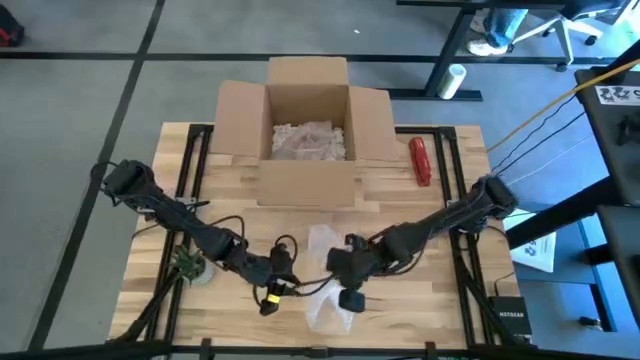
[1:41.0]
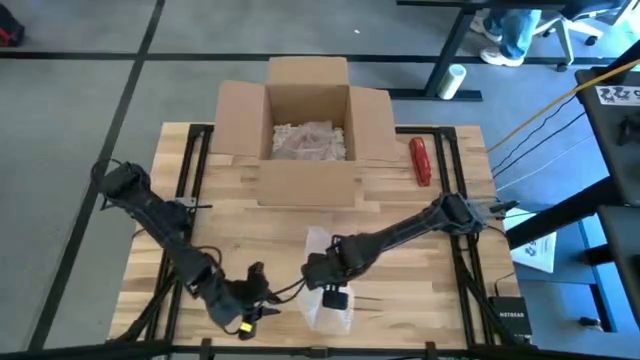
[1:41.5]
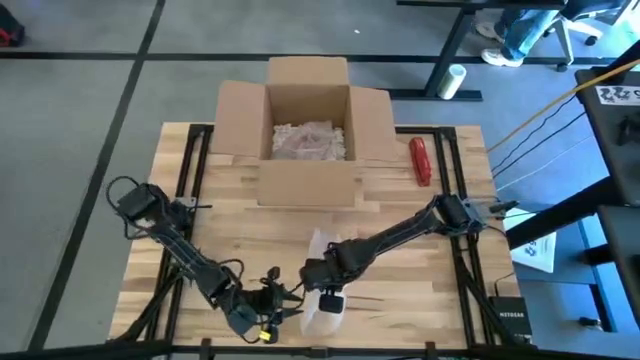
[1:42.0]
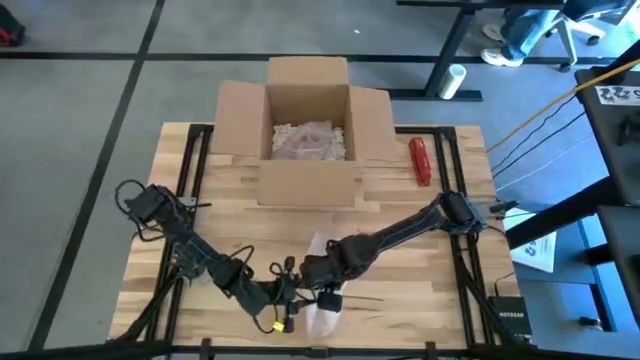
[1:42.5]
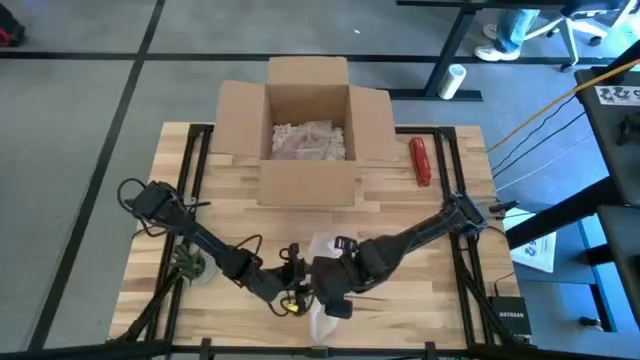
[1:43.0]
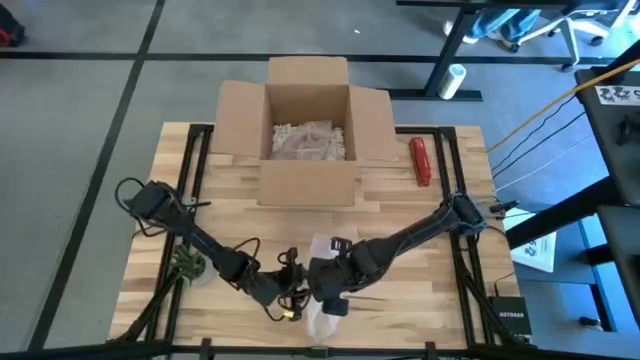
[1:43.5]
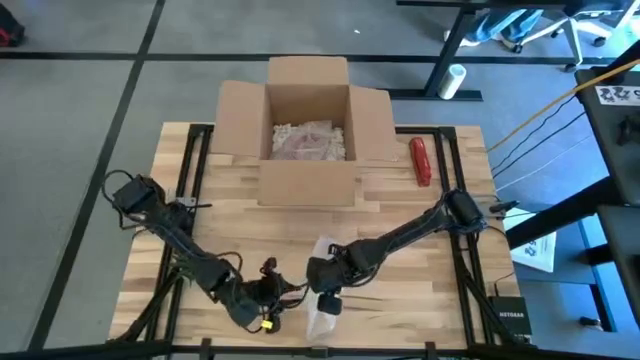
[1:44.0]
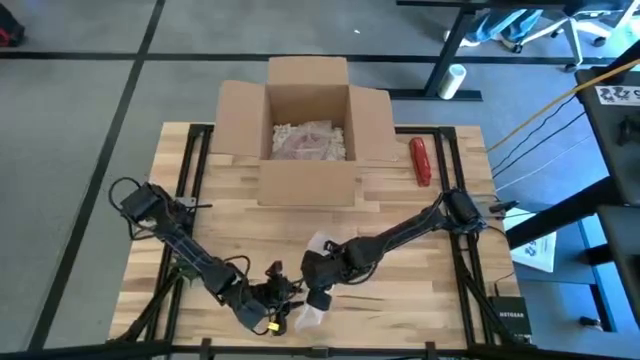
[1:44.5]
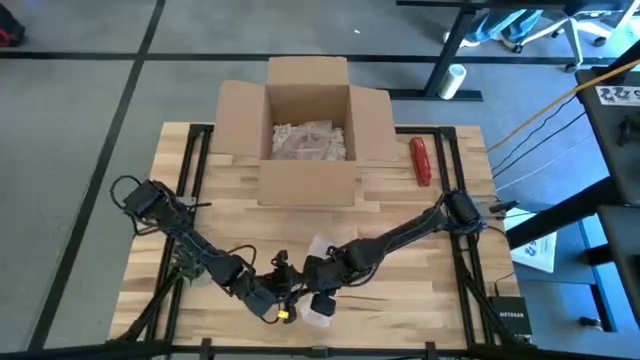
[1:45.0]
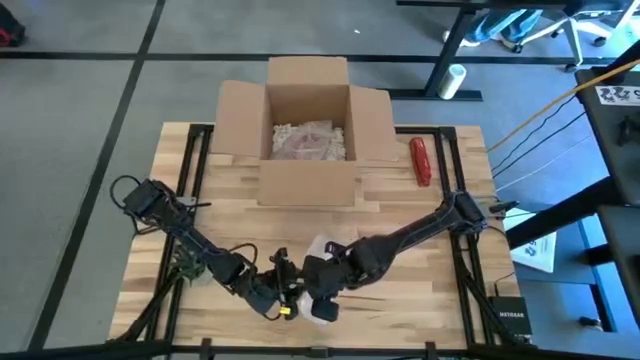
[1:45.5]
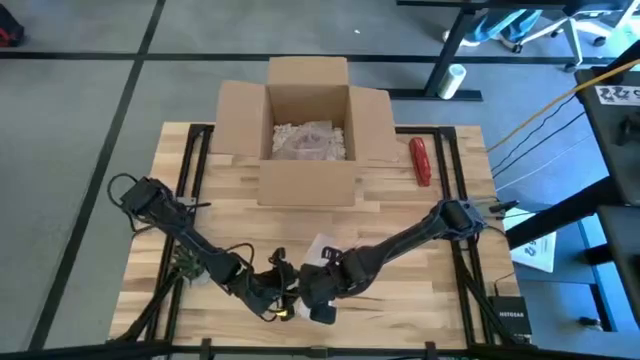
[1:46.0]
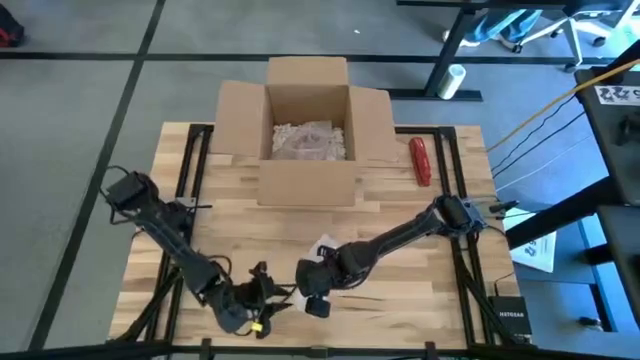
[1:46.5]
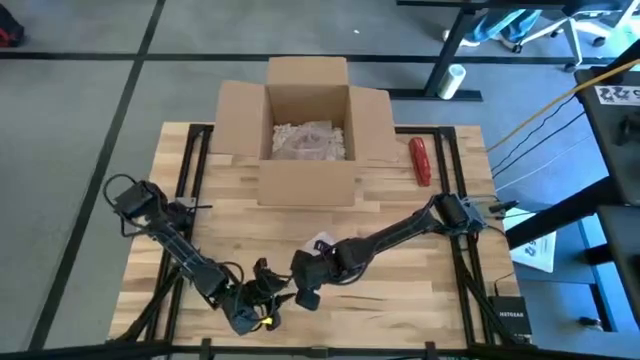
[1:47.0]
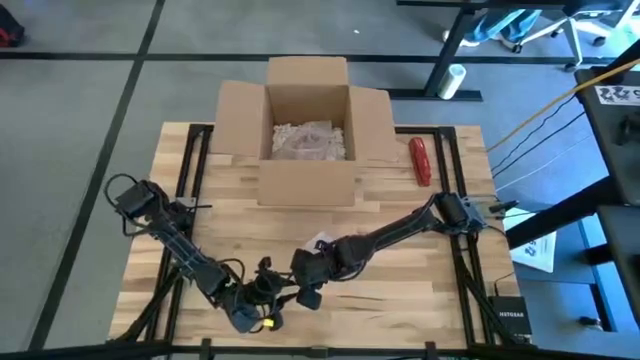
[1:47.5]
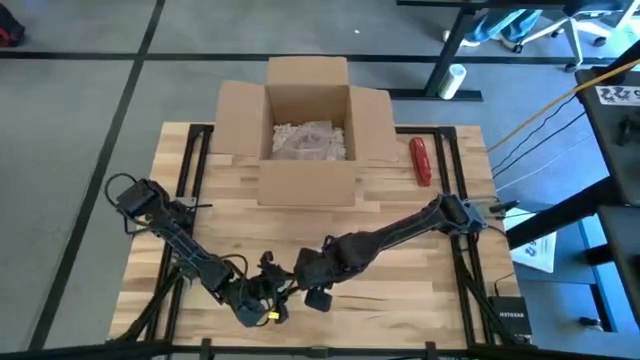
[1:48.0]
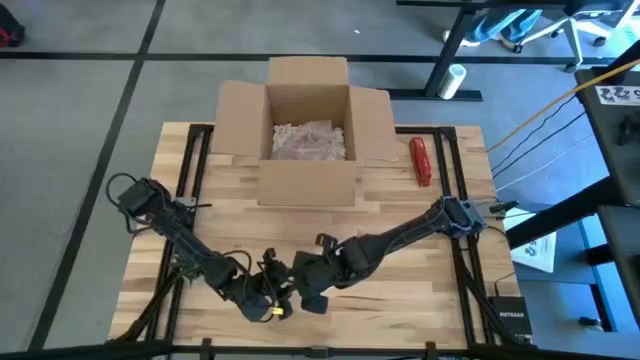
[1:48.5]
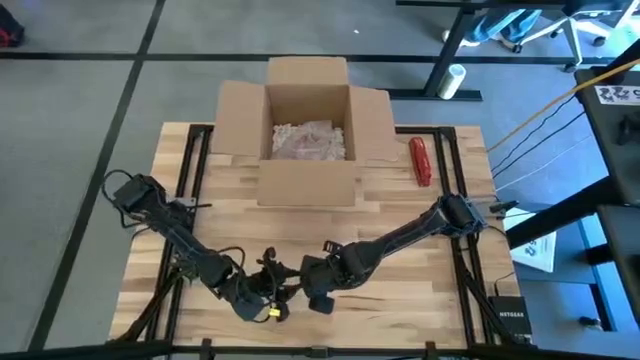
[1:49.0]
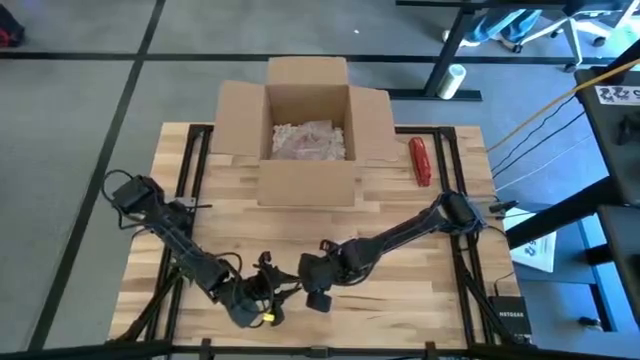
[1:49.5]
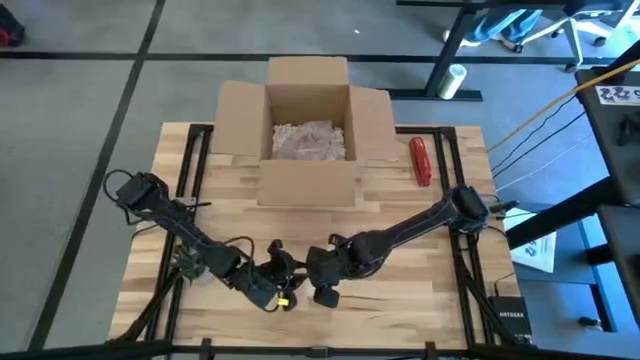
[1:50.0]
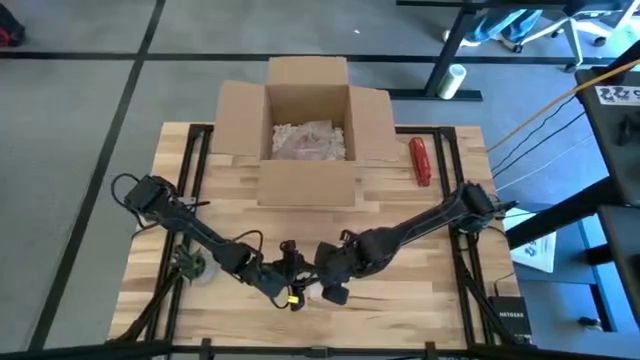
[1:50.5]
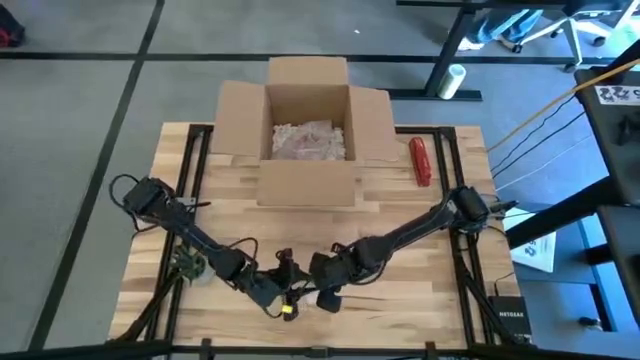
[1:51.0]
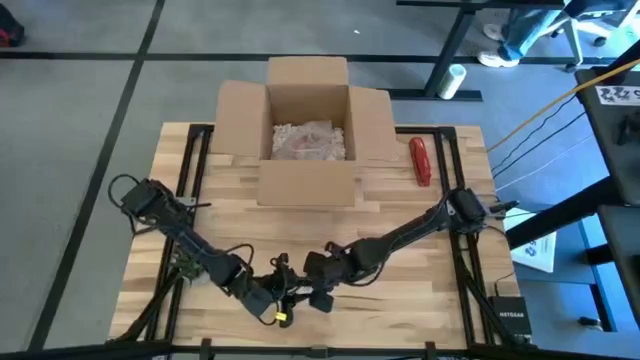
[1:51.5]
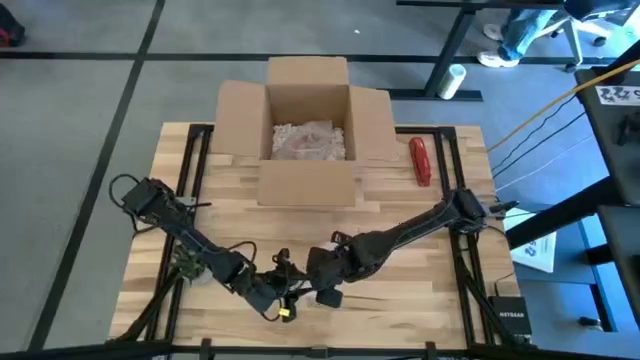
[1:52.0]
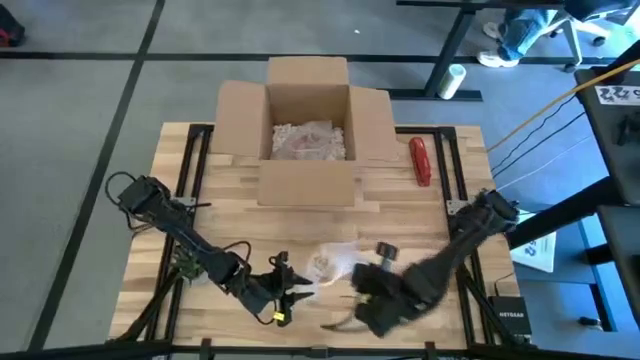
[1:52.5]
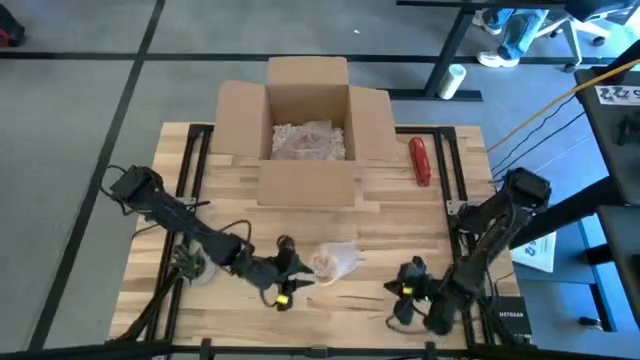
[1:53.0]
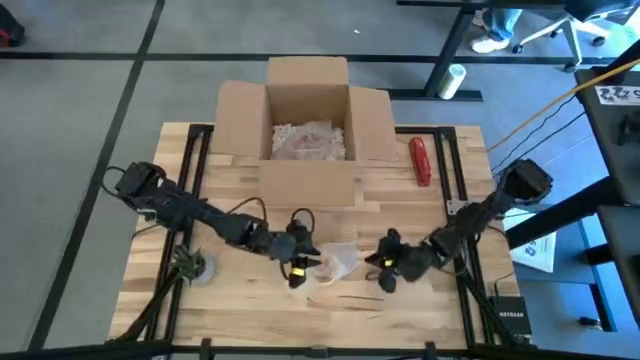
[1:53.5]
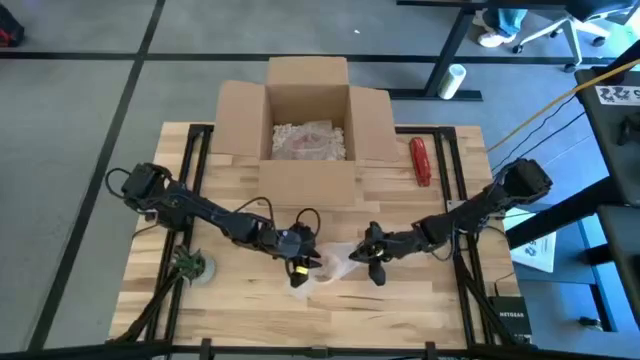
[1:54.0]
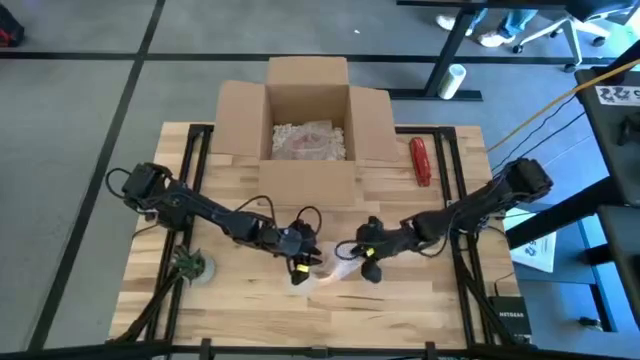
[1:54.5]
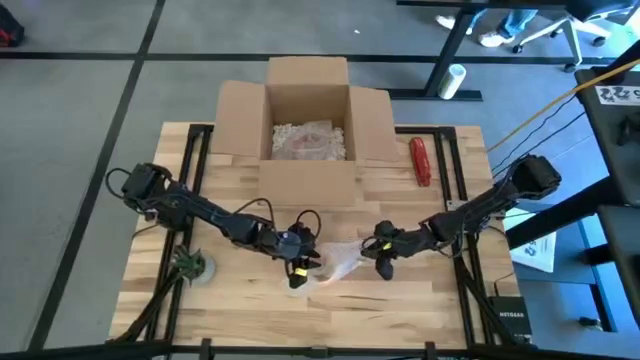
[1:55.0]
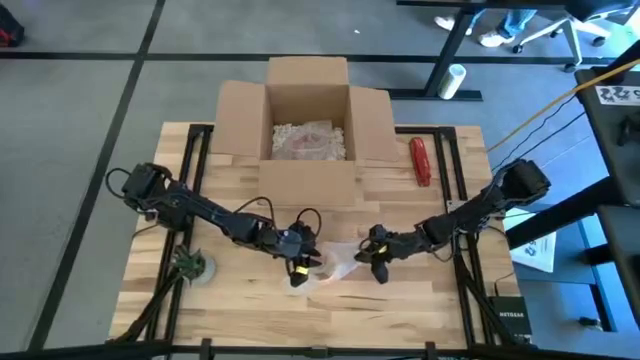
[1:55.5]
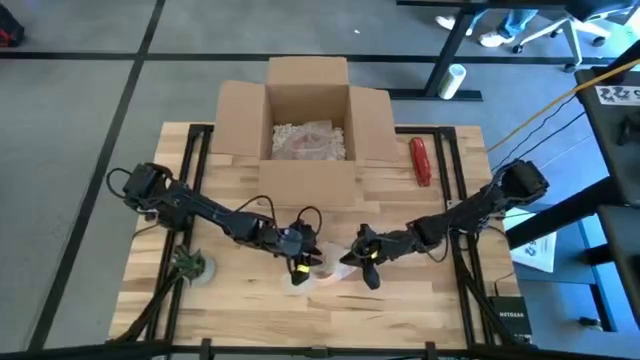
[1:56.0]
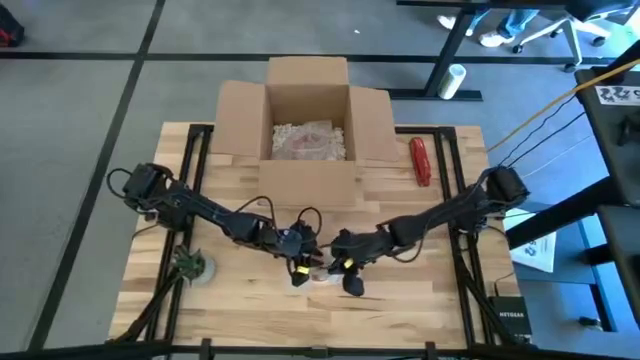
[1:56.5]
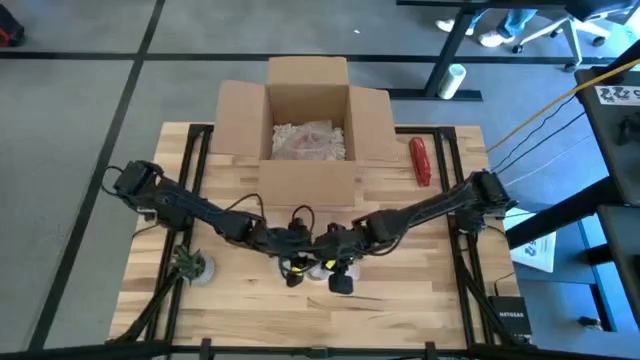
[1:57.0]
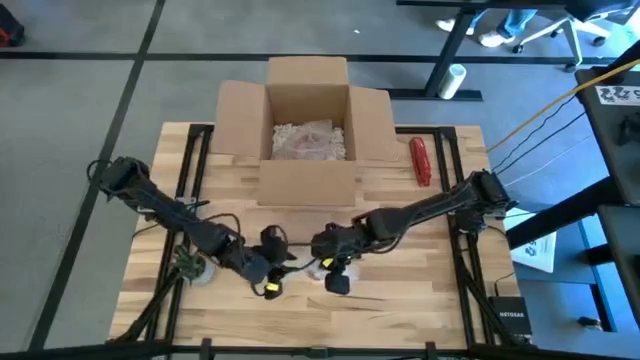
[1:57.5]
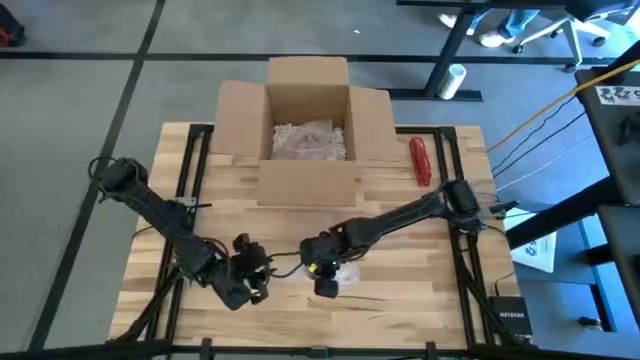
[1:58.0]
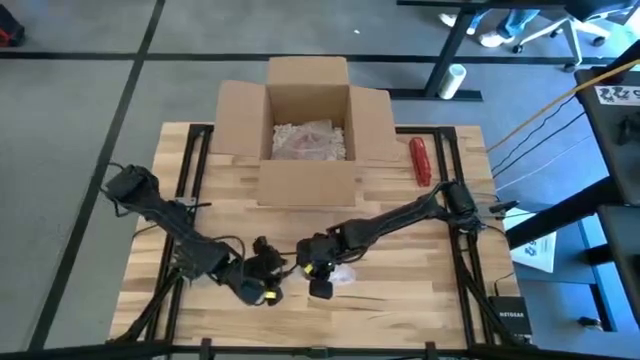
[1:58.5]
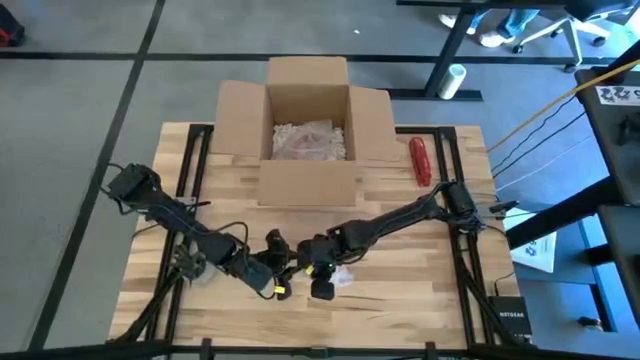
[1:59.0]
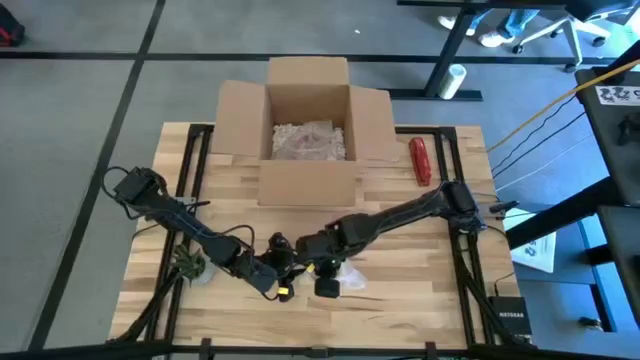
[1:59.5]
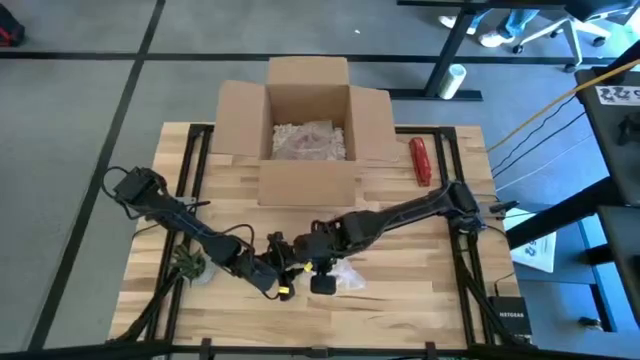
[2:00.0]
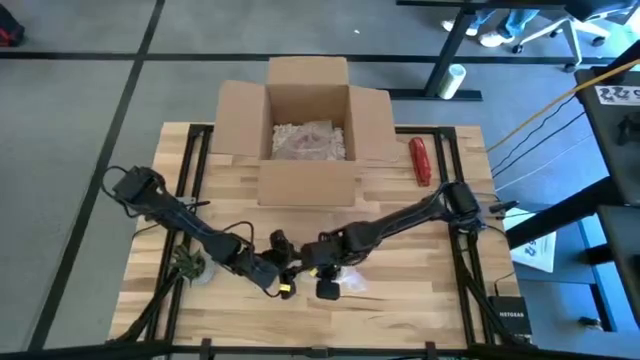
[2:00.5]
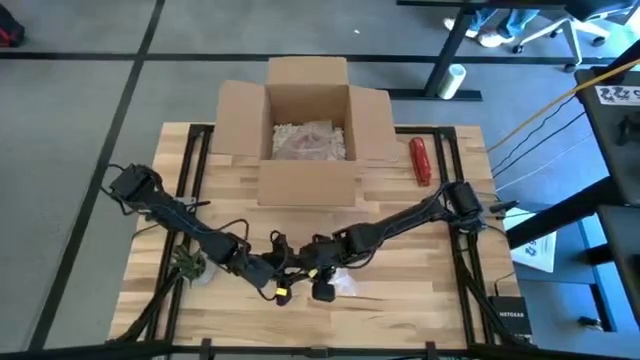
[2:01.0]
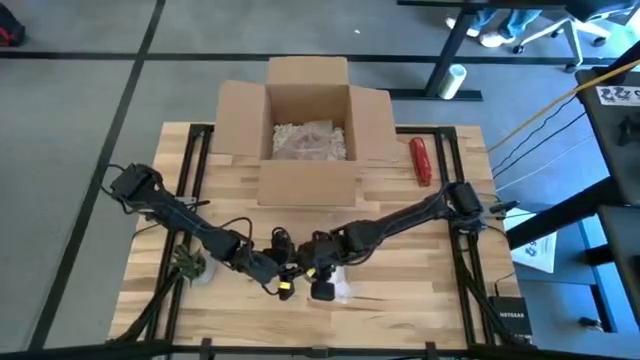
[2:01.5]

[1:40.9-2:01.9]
Task: wrap mug
Wrap the yellow mug with bubble wrap
